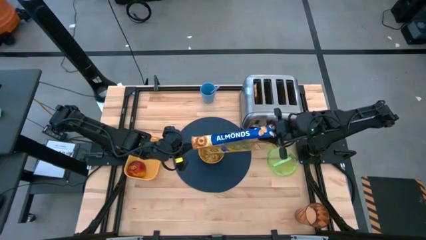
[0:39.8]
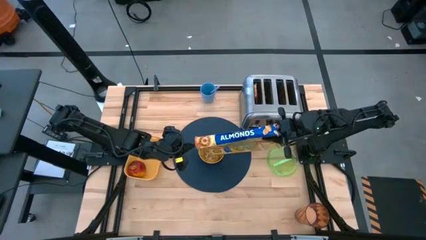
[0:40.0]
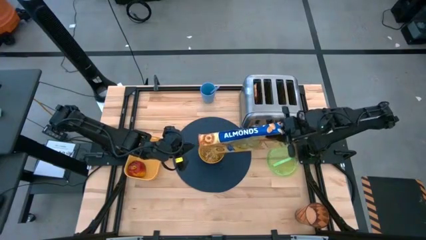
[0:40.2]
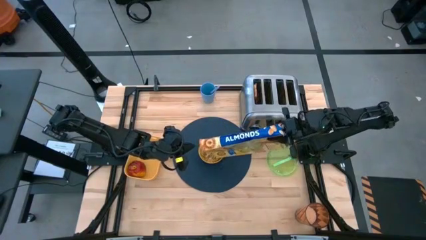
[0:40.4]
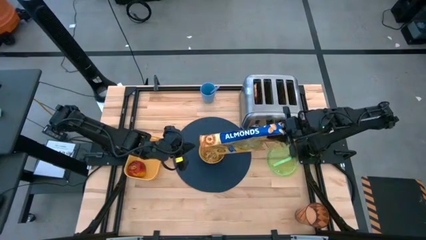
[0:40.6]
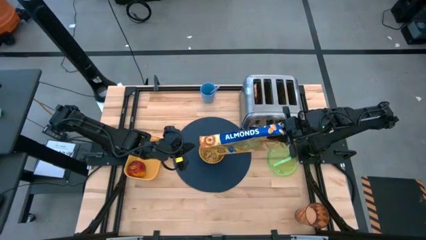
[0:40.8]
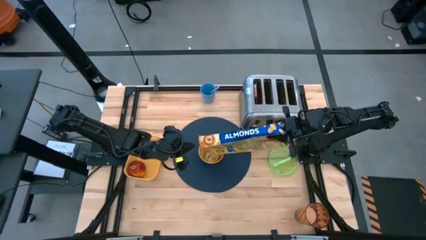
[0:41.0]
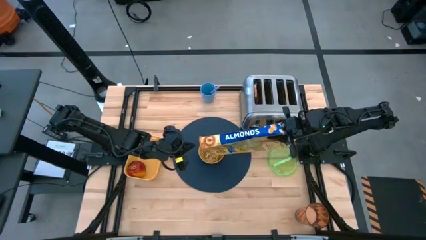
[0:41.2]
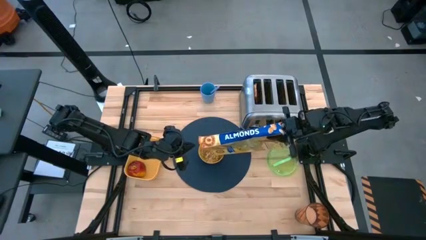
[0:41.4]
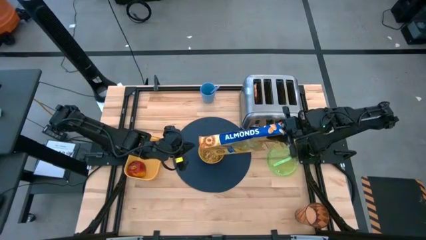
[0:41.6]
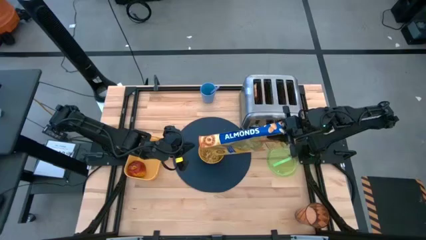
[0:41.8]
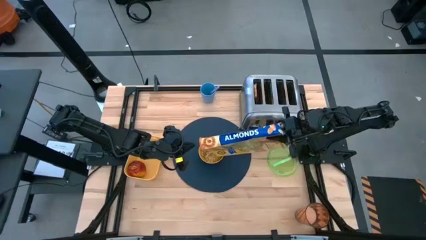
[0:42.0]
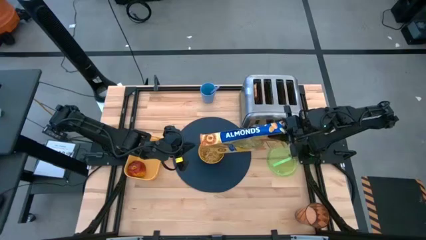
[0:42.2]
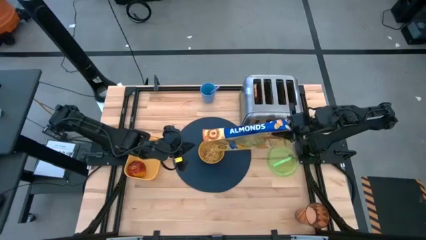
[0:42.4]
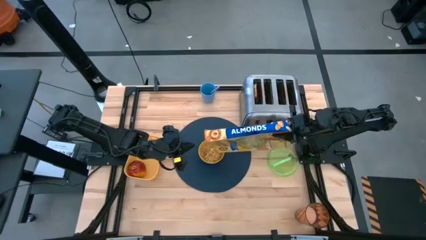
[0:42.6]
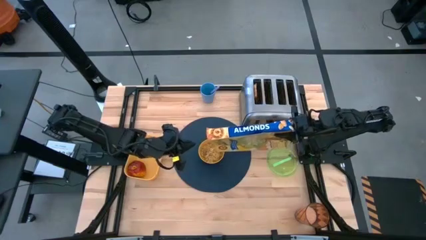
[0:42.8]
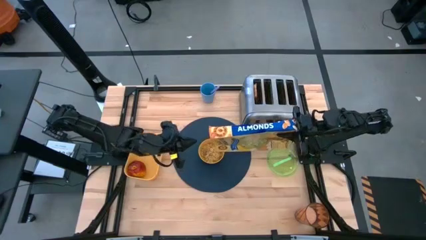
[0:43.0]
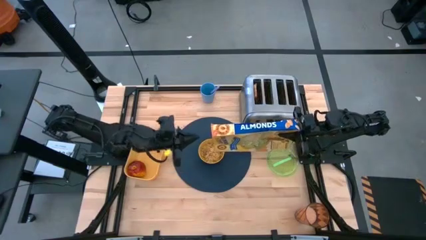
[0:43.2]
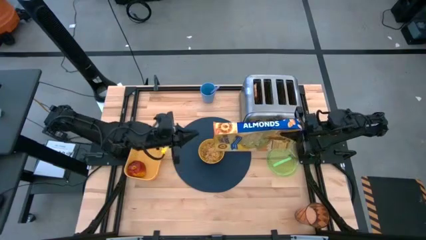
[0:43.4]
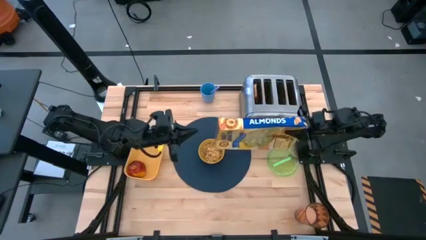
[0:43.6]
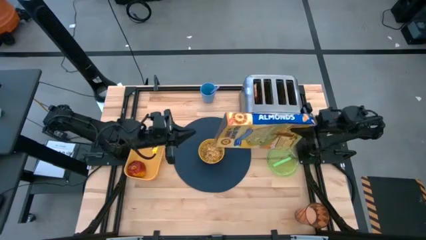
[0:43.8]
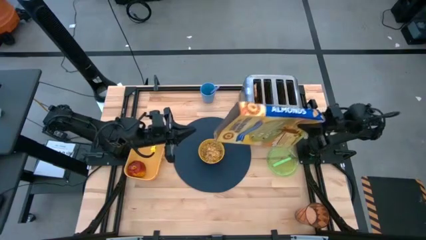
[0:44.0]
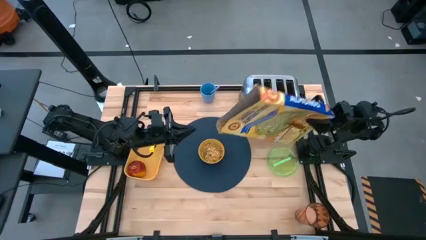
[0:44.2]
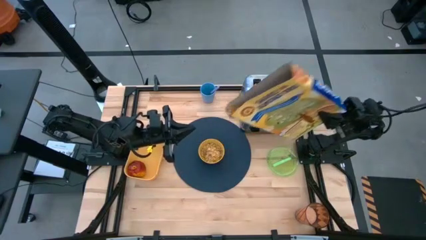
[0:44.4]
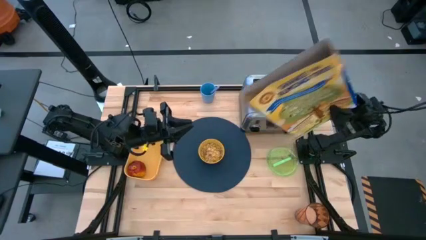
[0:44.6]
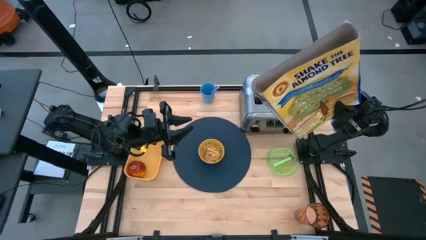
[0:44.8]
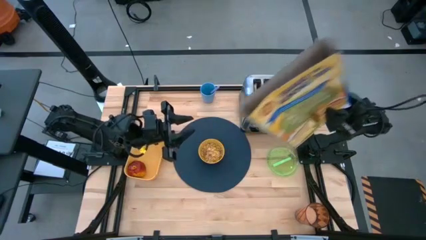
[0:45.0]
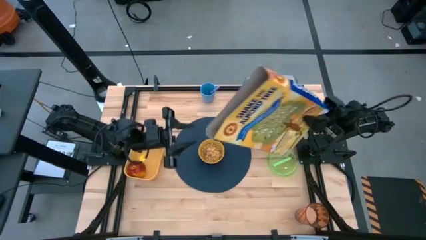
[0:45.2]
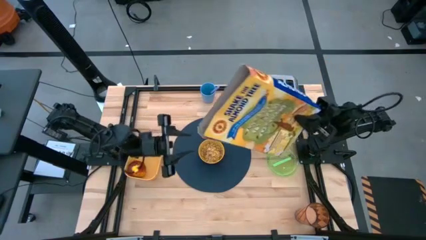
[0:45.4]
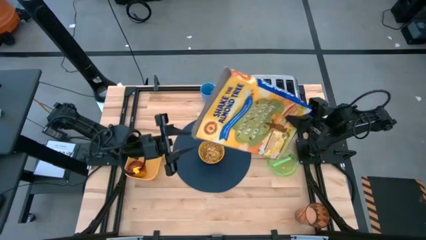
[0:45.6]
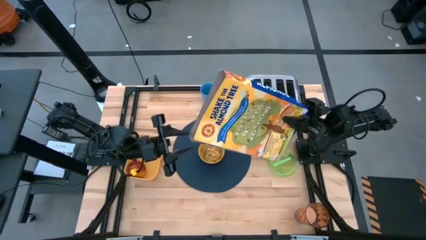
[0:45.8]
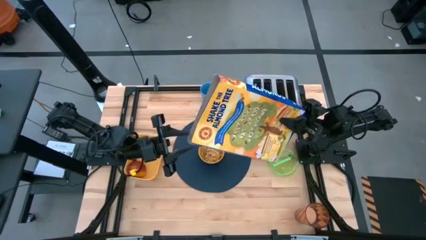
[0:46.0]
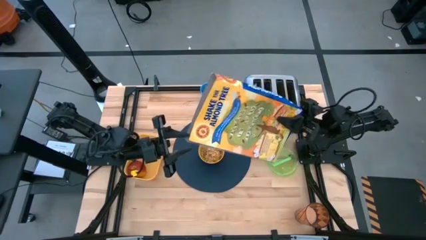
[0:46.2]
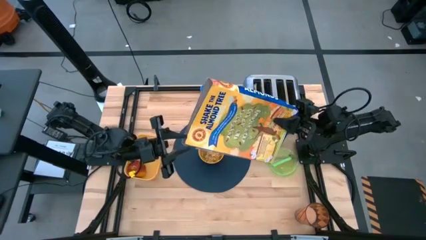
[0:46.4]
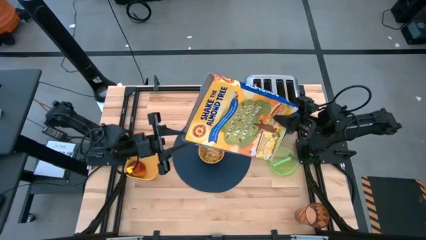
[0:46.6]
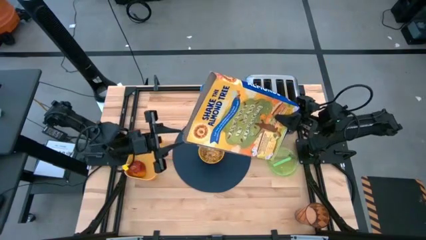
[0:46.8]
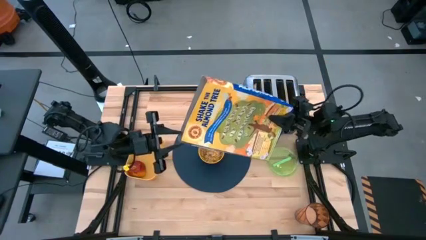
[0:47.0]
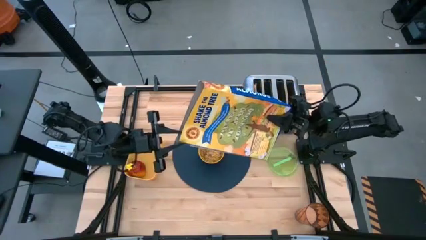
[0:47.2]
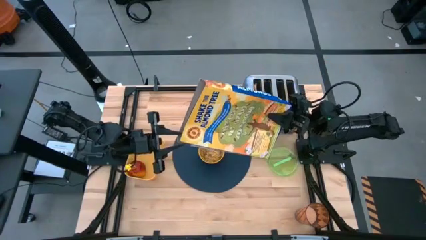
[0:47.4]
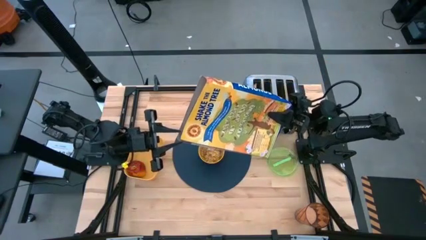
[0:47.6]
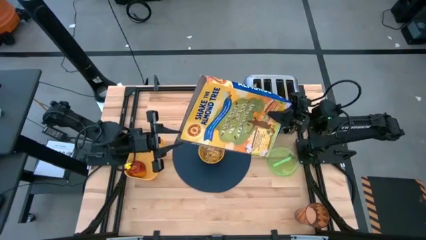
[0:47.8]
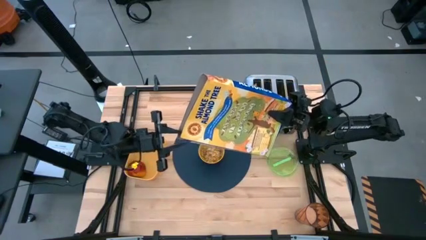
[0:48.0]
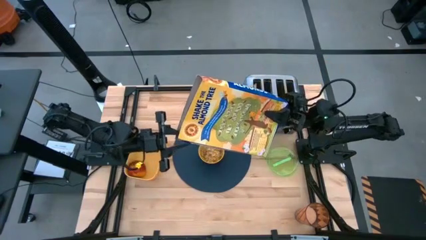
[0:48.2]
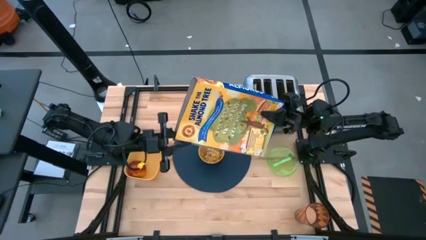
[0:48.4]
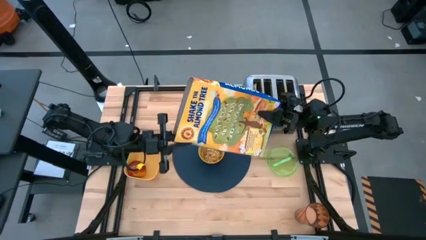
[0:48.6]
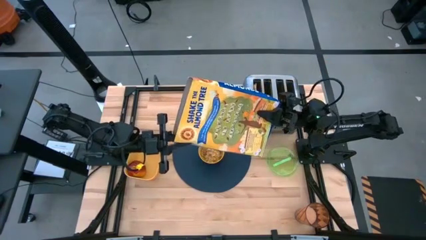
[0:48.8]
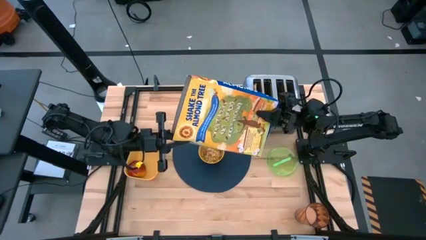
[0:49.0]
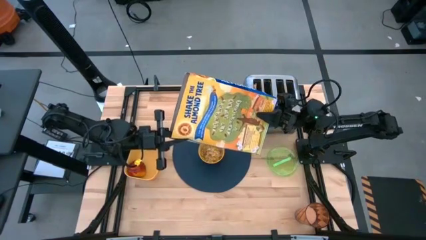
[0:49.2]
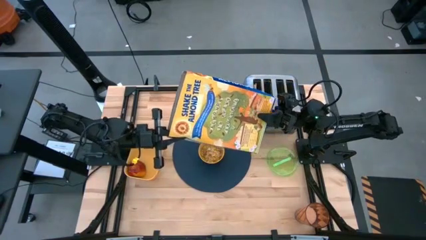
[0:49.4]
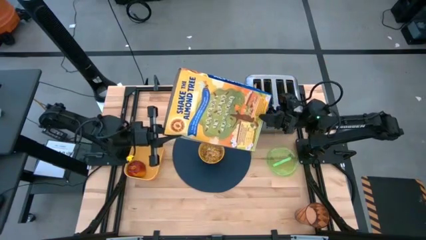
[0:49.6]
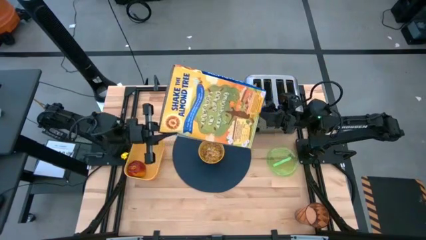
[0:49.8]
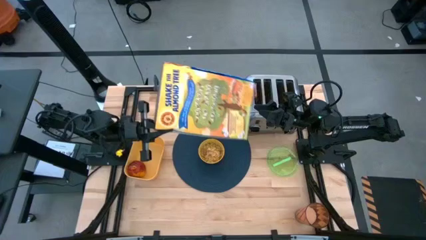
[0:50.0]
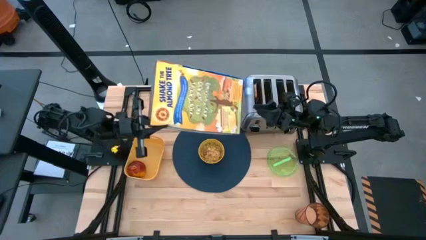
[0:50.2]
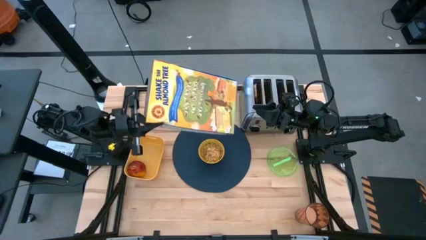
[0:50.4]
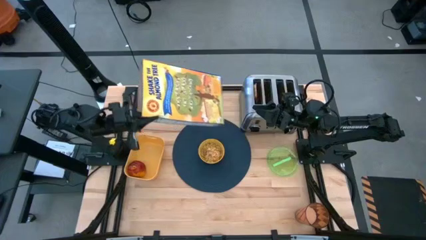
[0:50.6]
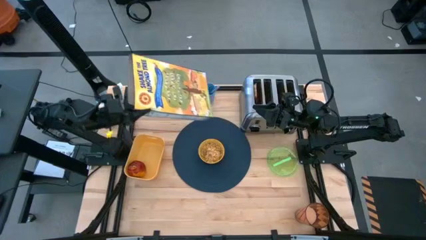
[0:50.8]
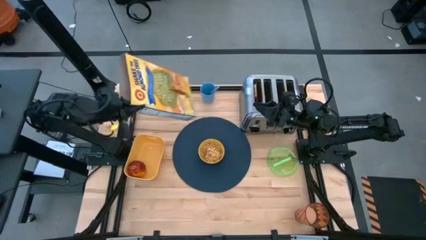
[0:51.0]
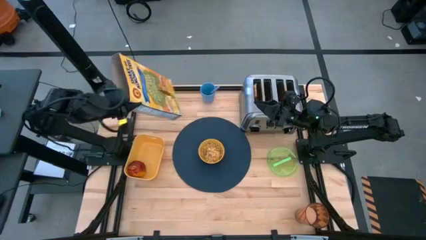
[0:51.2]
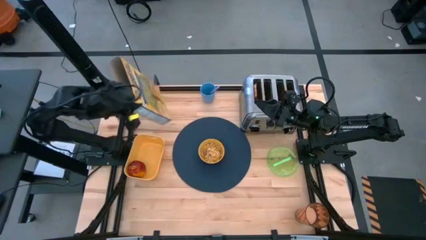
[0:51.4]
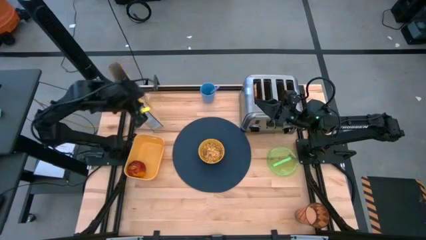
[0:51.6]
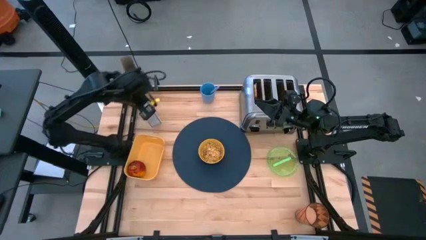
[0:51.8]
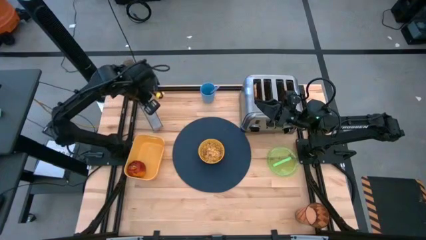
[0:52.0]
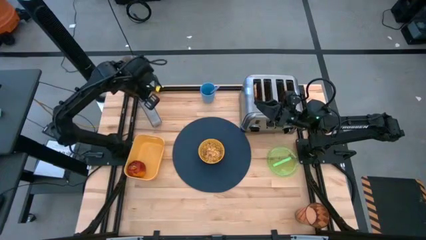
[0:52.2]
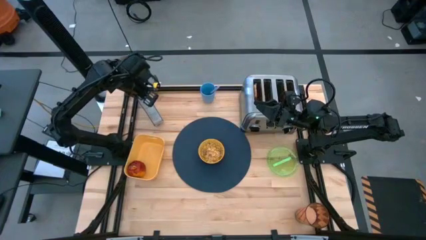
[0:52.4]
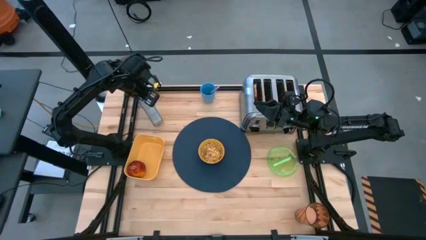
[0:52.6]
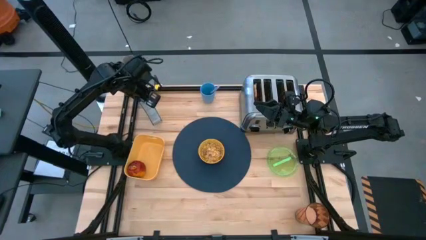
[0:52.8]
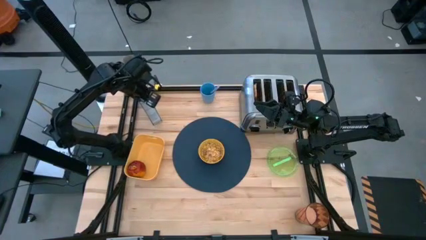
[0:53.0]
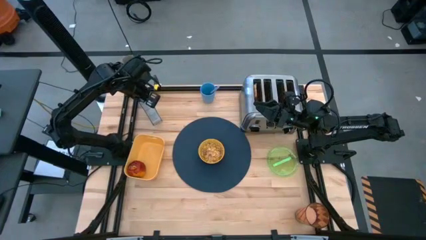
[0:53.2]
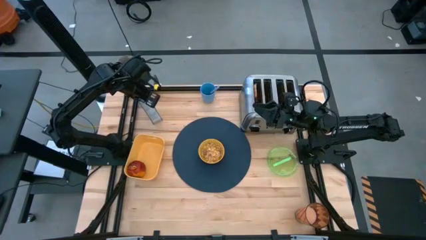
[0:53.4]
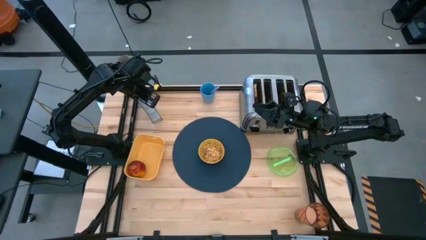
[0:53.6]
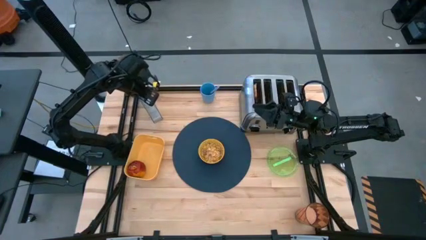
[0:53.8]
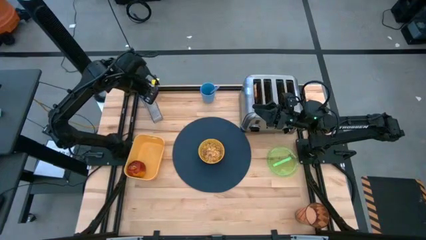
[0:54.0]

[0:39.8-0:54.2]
Task: Arrange a breakfast setting
Pour the cereal from the cereal box into the bowl

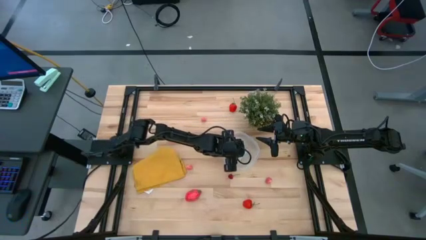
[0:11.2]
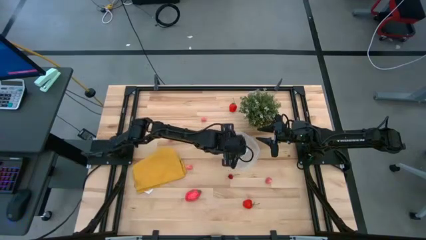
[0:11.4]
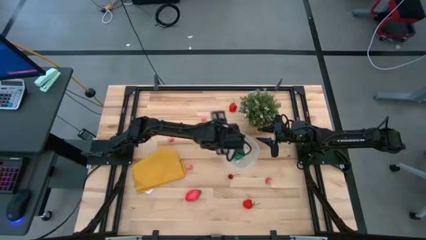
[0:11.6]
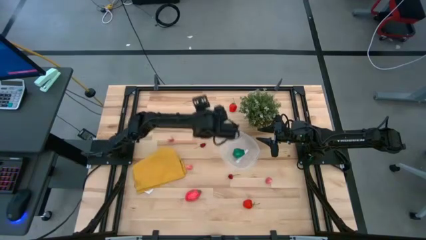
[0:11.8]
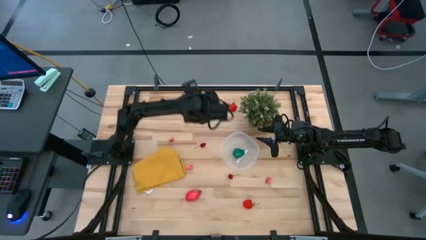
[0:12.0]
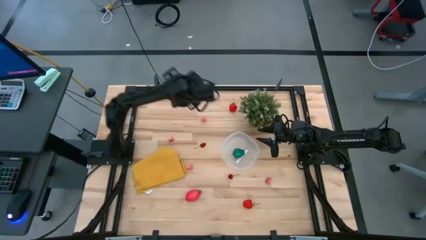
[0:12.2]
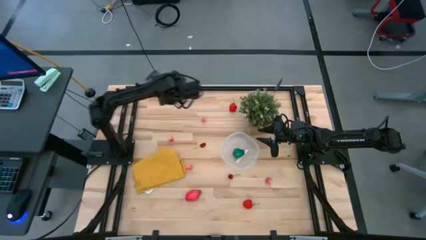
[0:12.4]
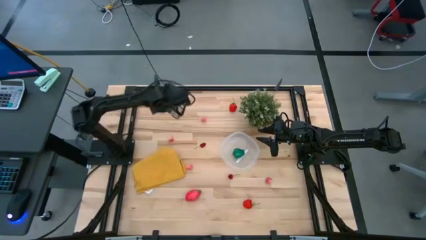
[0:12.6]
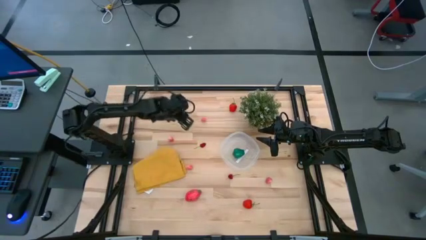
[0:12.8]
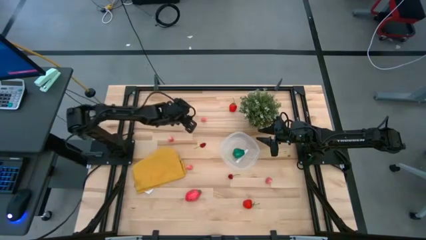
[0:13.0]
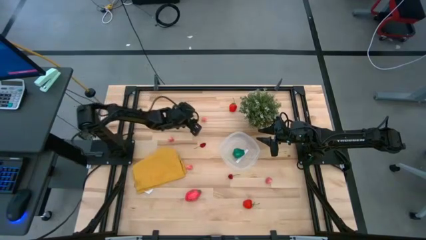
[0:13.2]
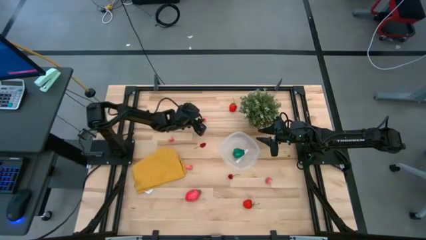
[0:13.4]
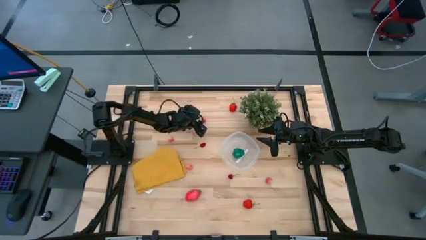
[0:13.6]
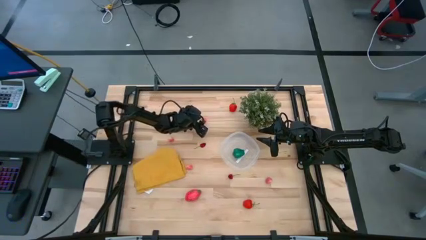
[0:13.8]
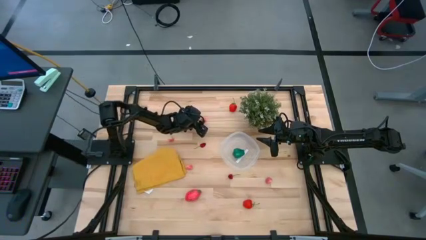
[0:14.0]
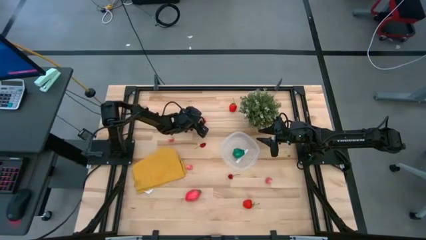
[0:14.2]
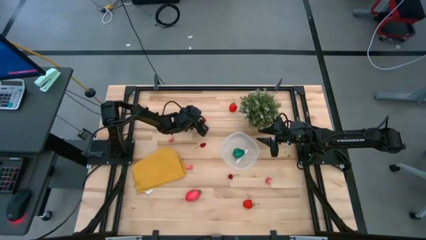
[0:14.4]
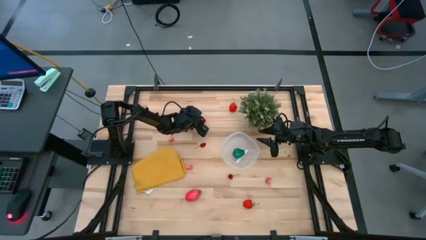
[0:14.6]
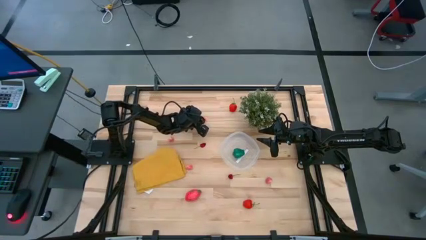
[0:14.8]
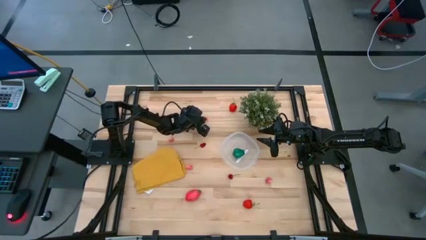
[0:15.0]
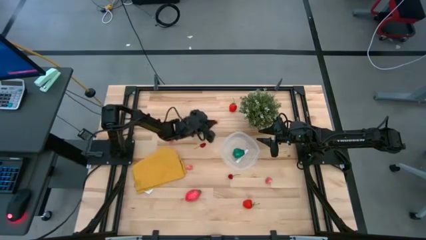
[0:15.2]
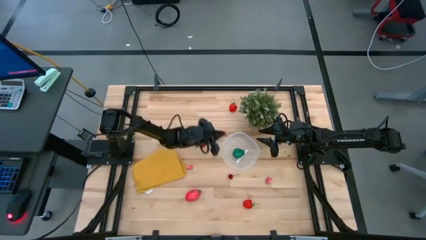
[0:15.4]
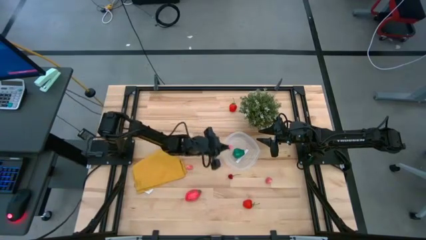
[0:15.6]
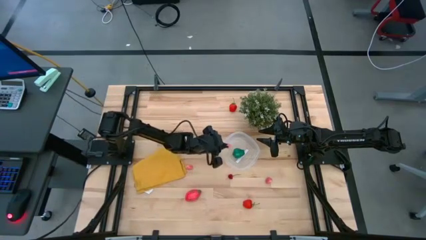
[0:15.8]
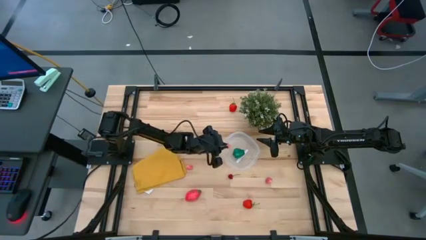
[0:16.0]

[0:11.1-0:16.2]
Task: Pick and placing Produce into tupperware
Put the peach into the transparent bin
